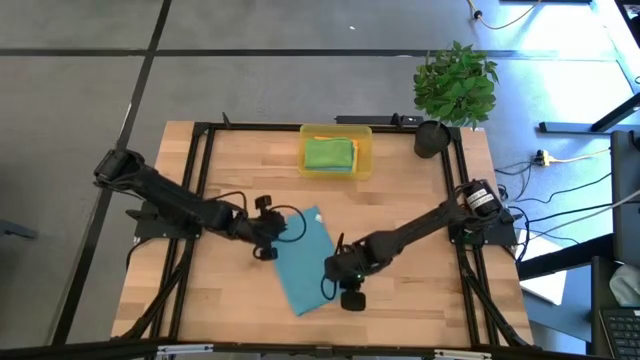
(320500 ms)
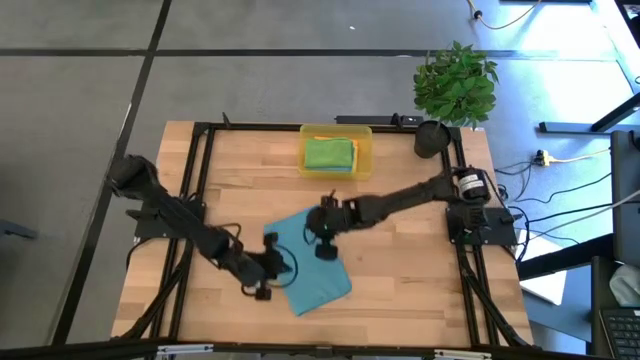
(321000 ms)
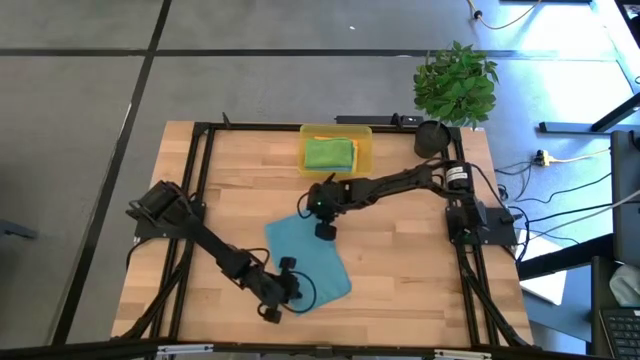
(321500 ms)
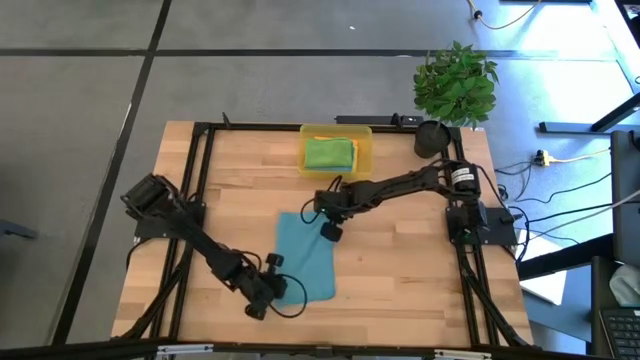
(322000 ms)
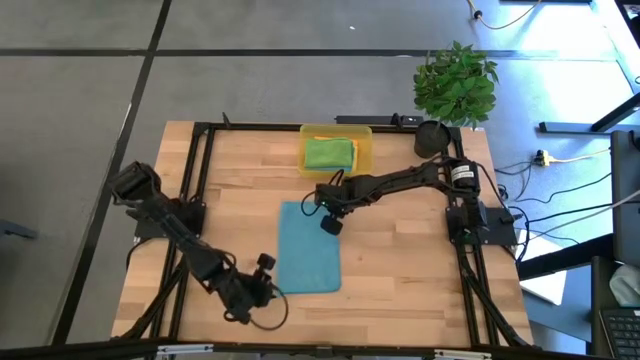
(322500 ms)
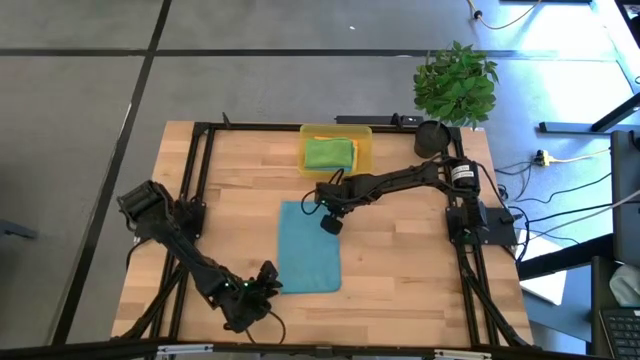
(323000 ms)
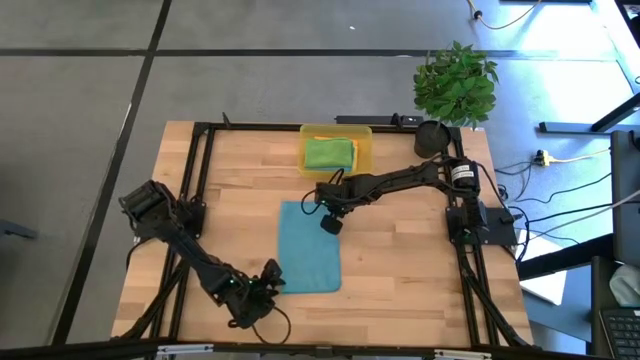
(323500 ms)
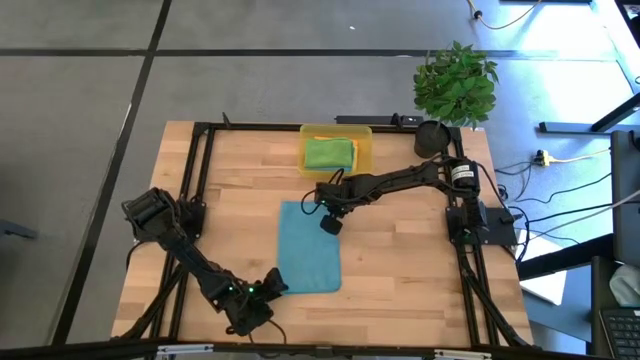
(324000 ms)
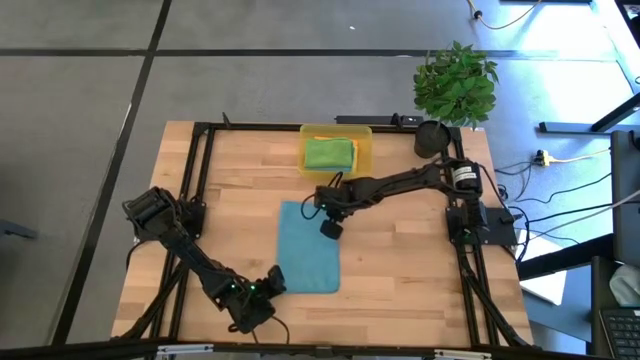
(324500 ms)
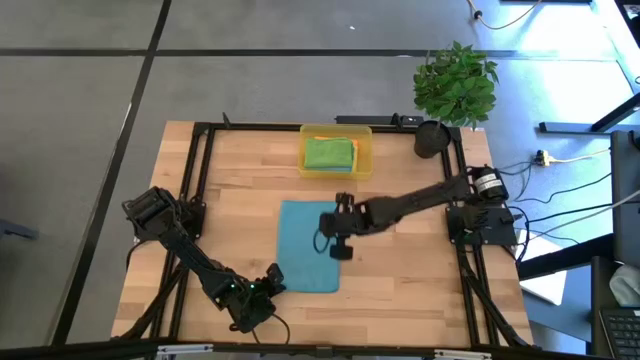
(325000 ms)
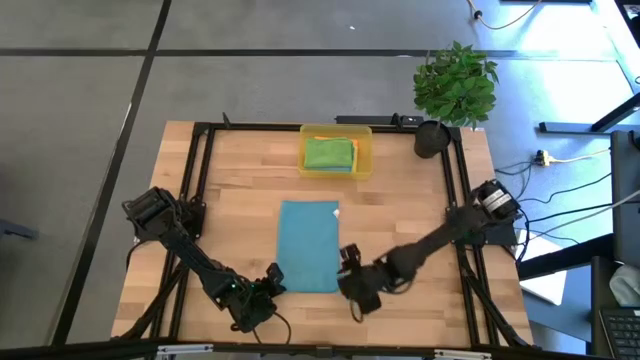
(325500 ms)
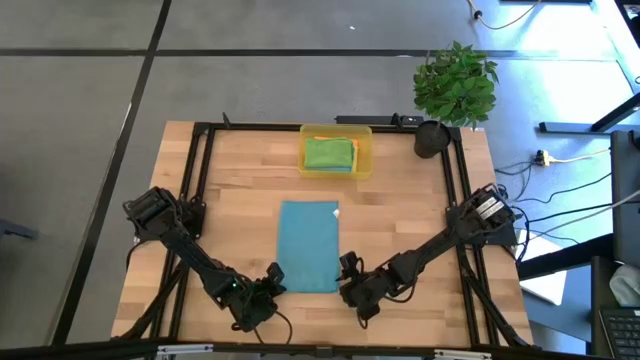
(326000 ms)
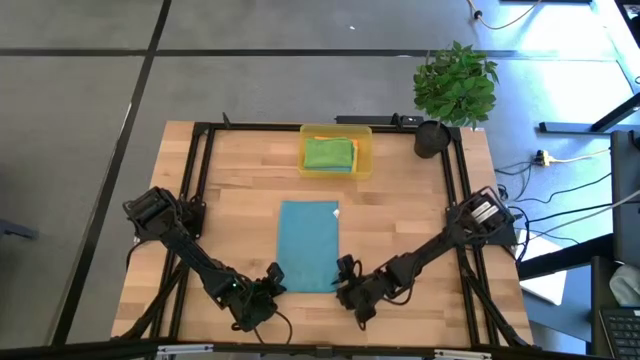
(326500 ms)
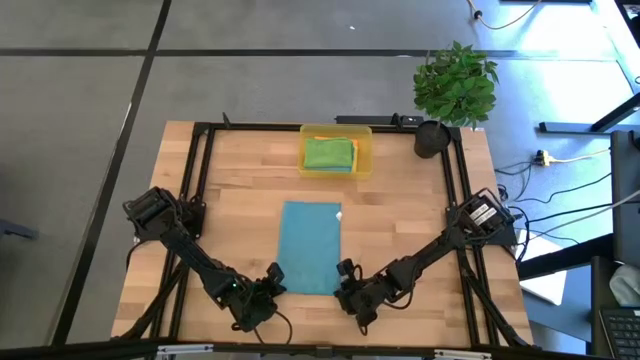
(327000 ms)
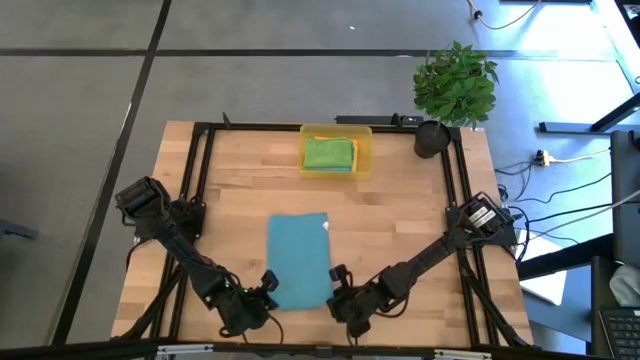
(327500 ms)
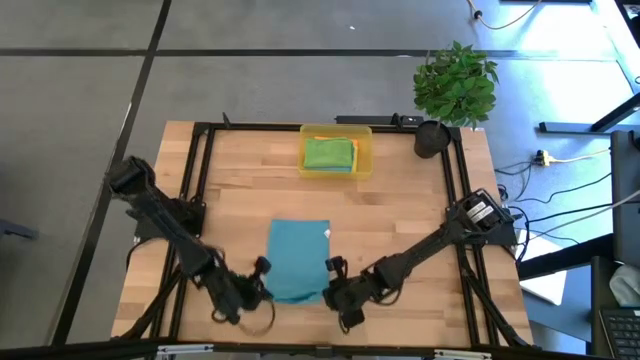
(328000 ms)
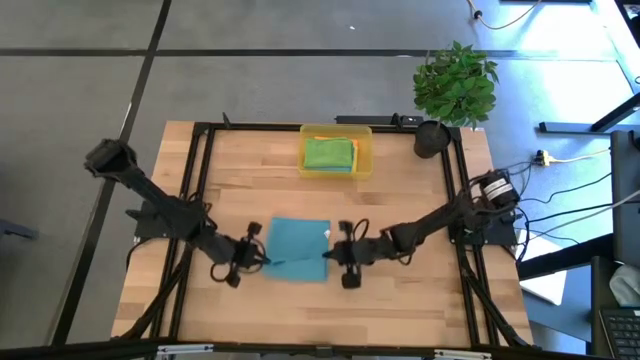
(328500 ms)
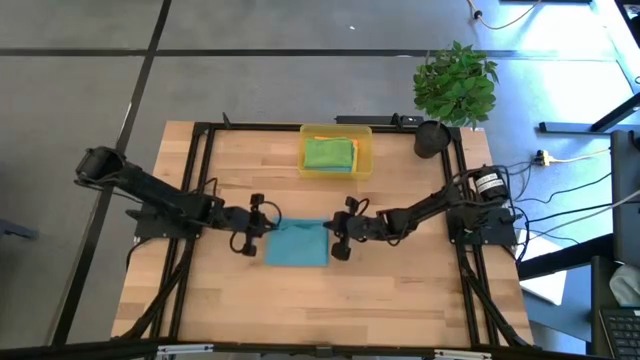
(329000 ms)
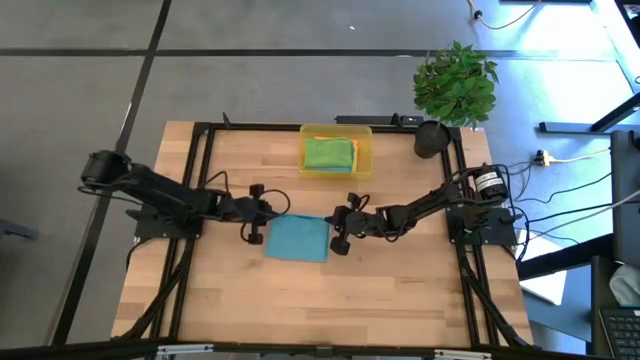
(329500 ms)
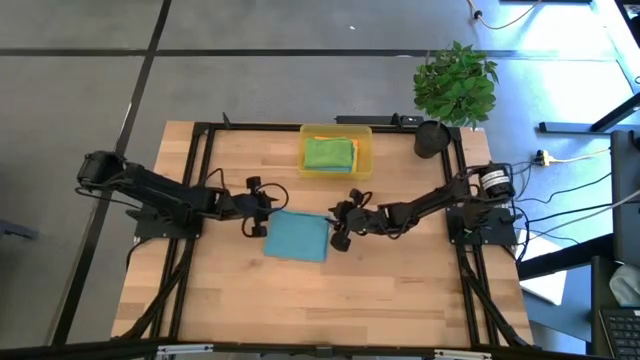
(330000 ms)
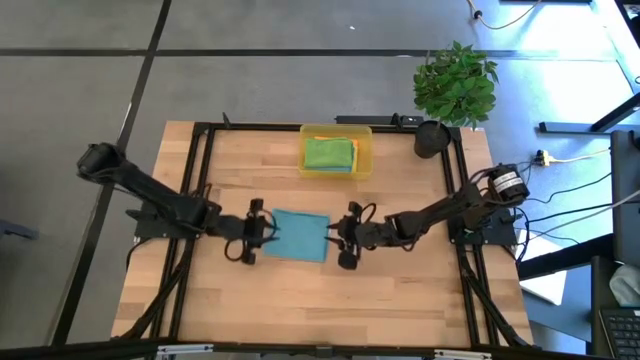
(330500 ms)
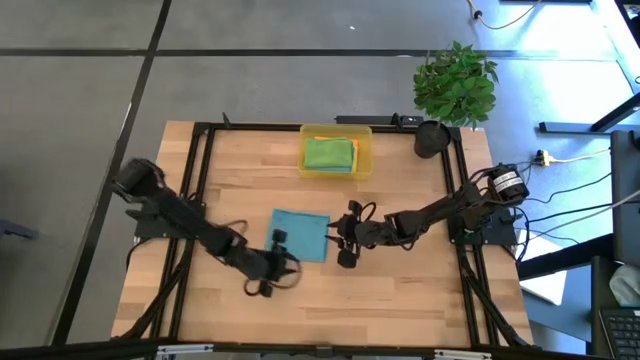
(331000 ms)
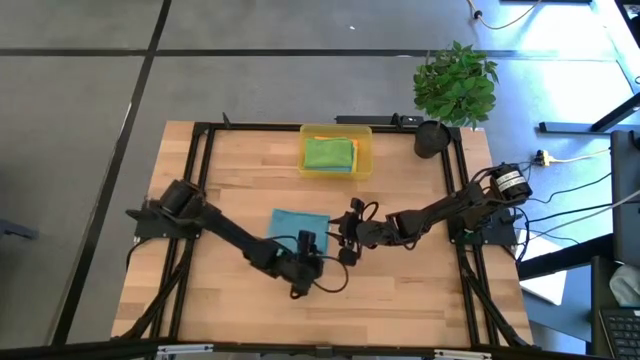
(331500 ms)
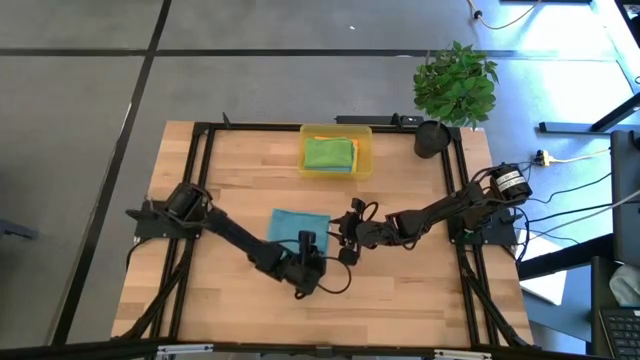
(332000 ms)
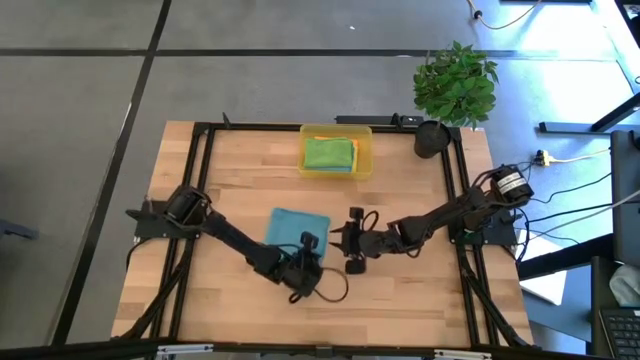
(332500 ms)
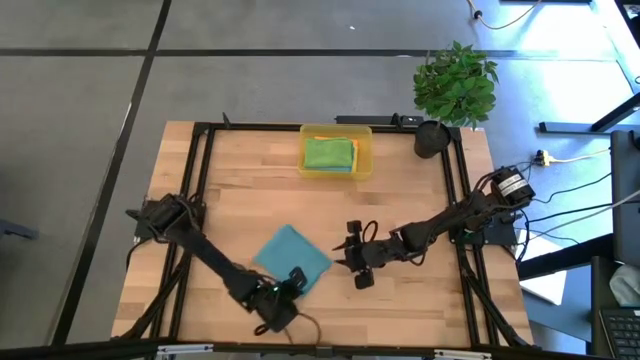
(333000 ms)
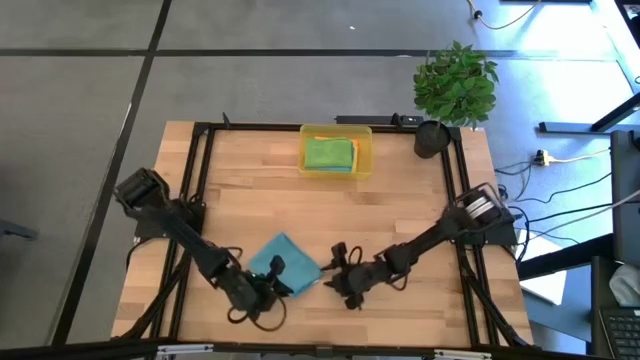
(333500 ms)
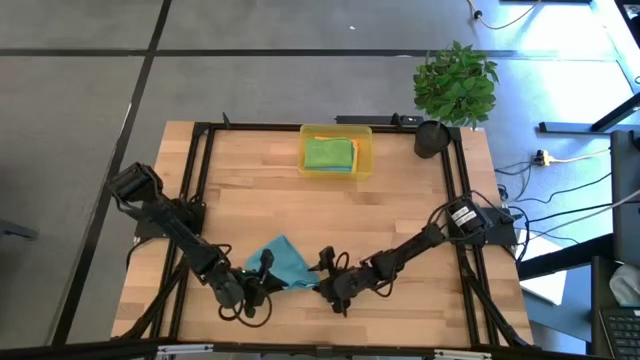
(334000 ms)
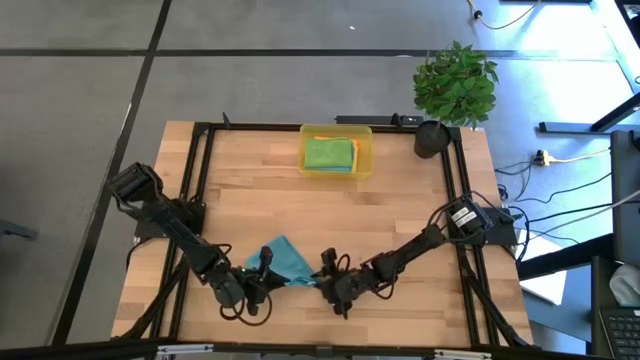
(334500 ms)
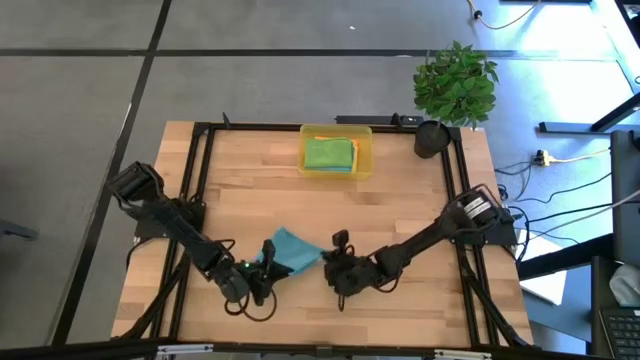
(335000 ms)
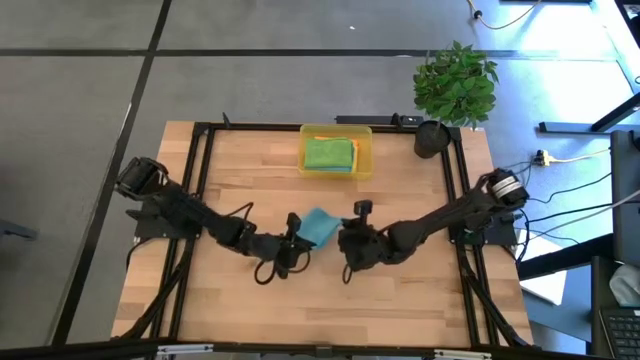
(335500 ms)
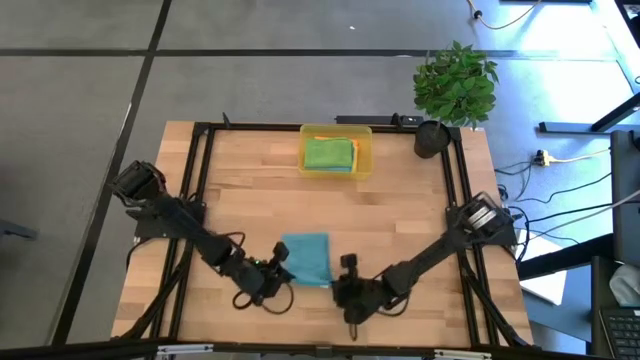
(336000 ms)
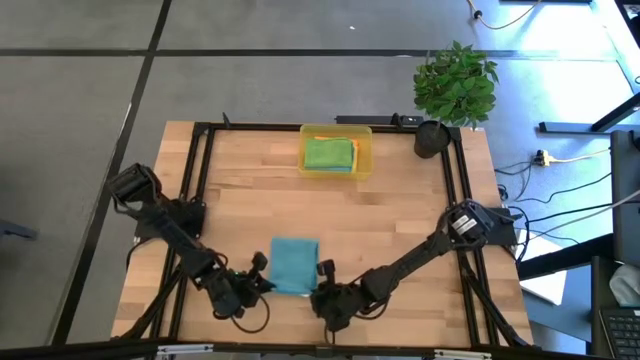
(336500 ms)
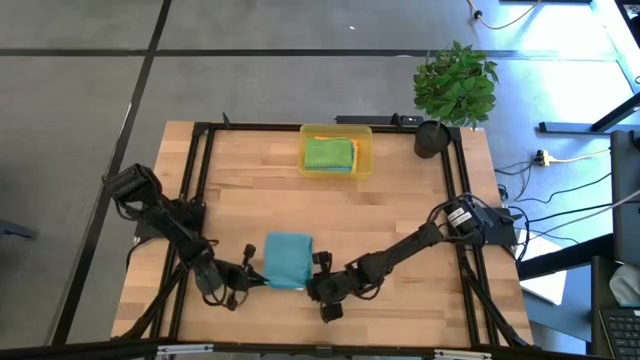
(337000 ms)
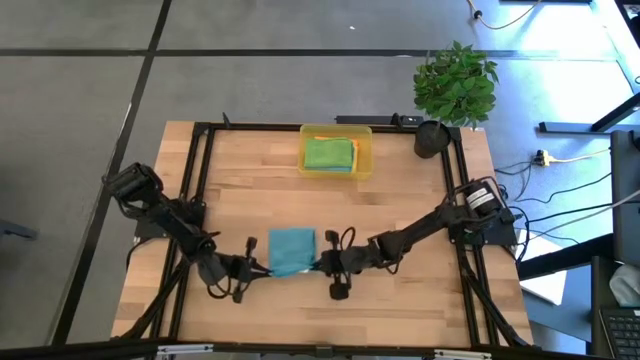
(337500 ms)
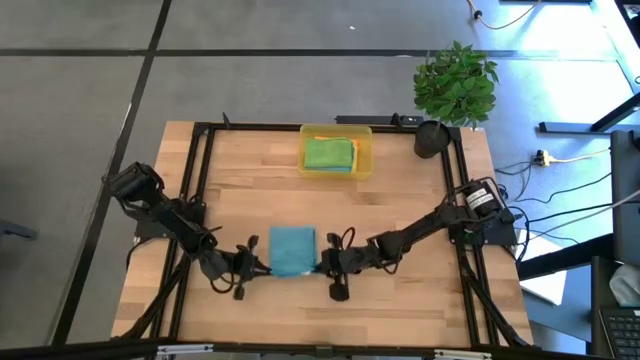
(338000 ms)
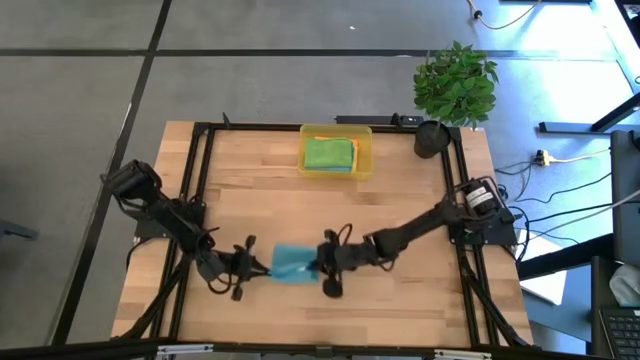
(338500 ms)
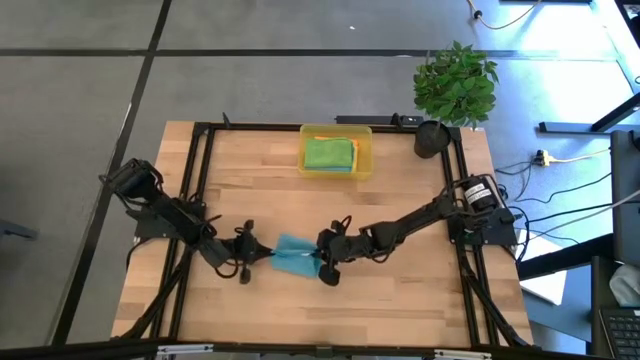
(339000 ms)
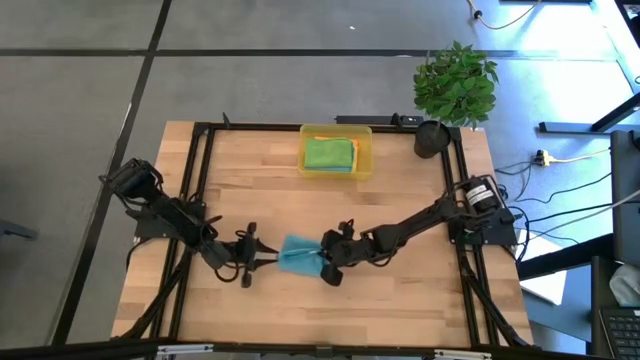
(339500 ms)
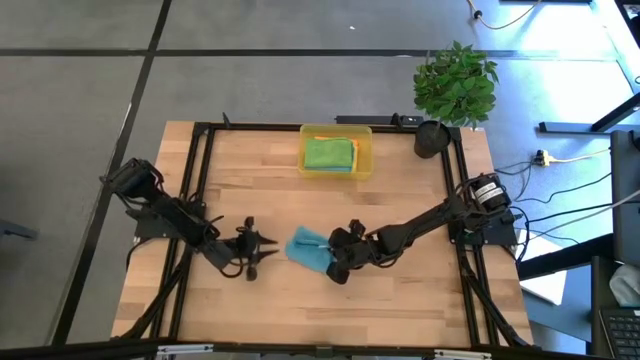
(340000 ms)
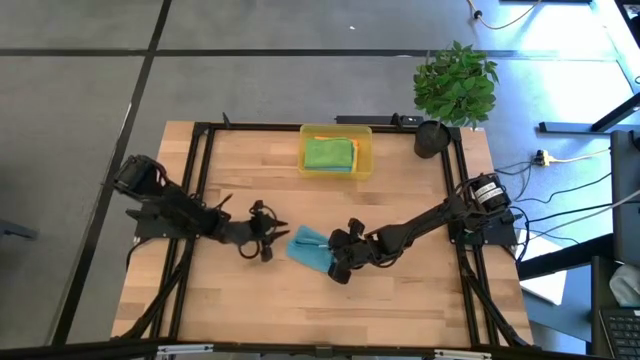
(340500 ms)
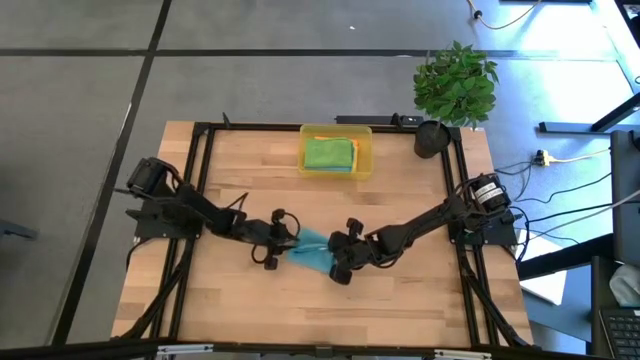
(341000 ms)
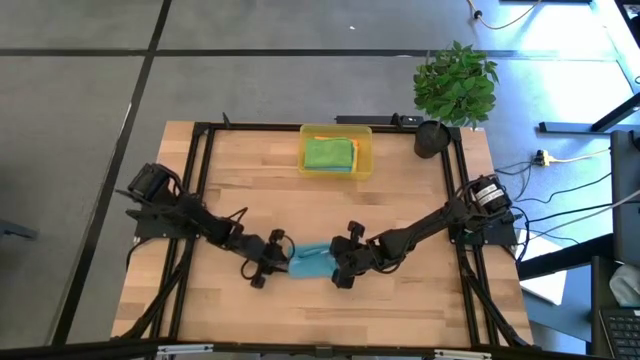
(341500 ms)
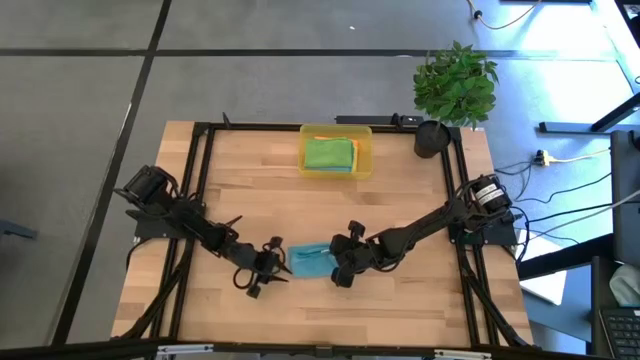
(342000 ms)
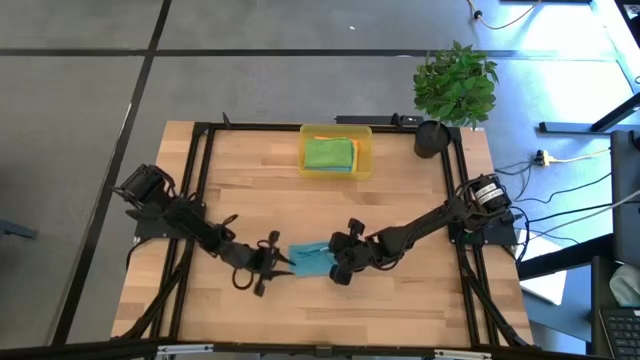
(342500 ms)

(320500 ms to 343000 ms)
Task: Fold microfiber towels
Fold the blue microfiber cloth
